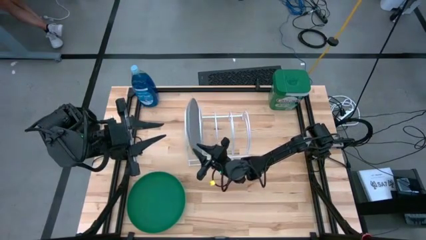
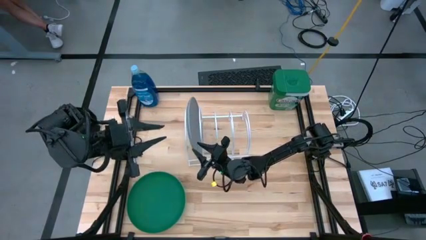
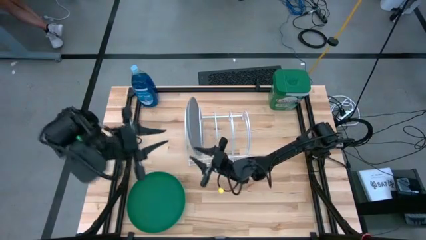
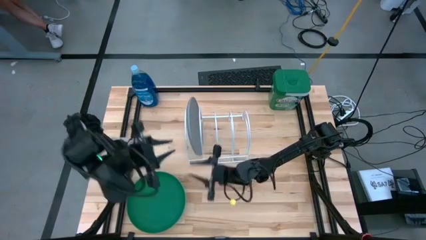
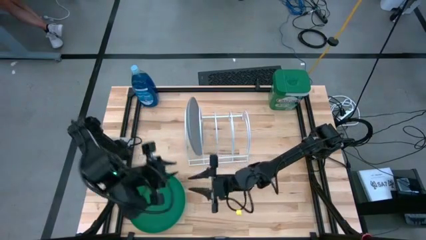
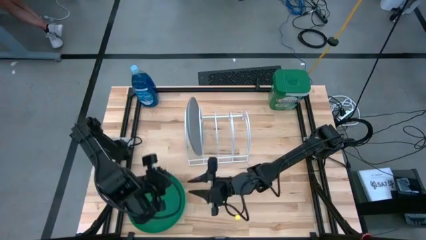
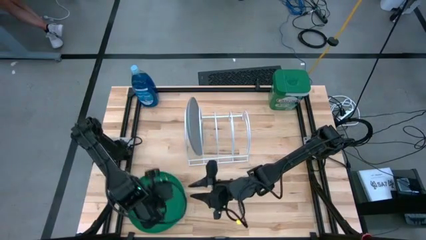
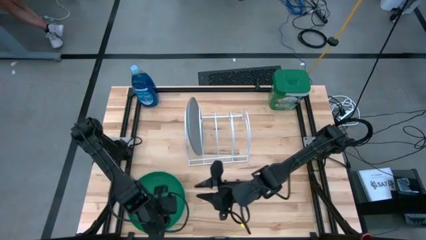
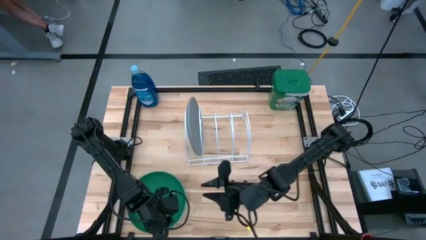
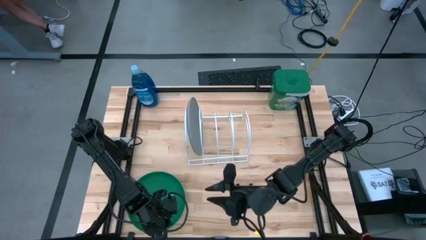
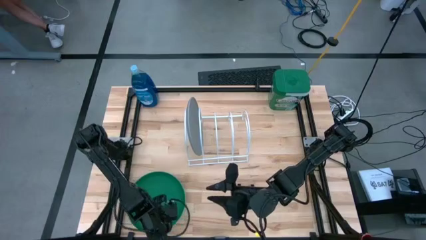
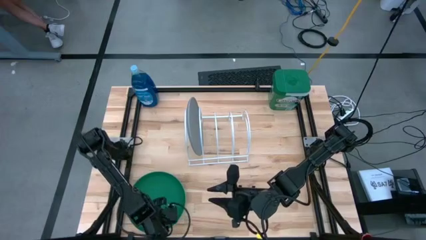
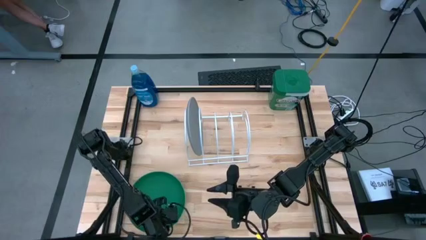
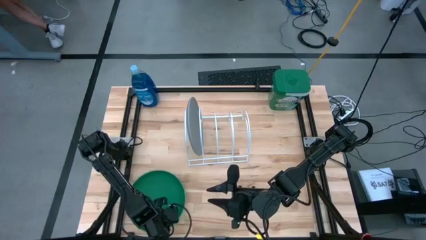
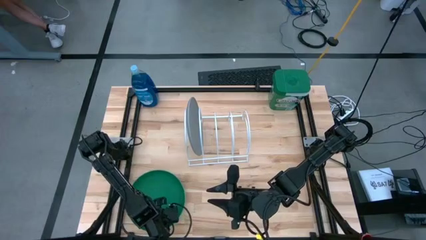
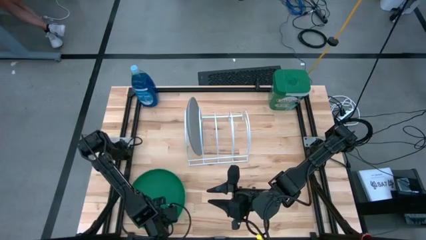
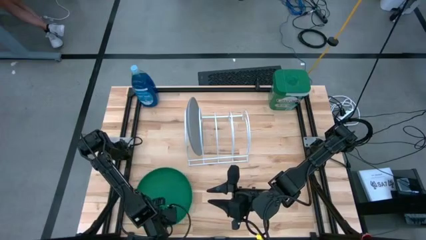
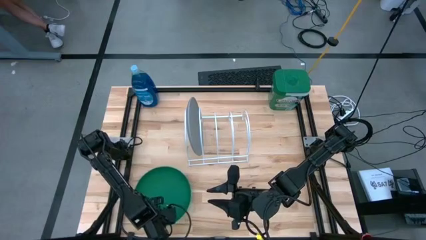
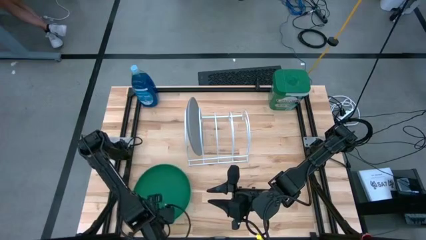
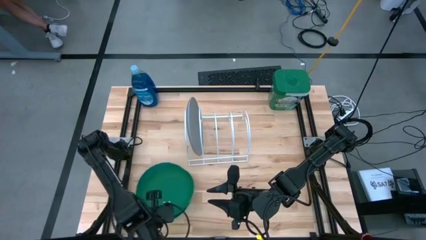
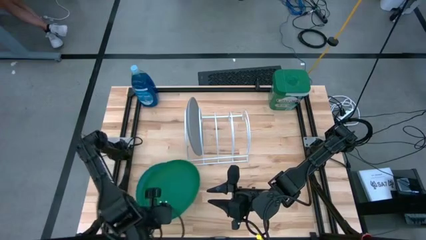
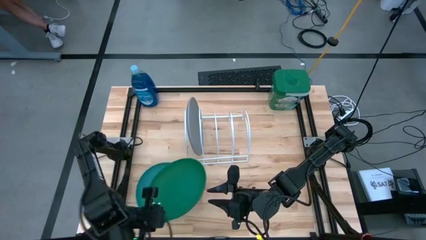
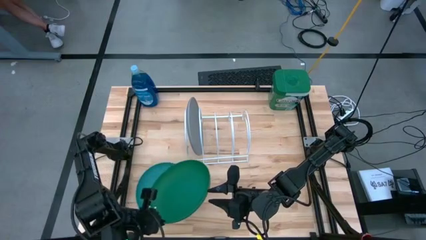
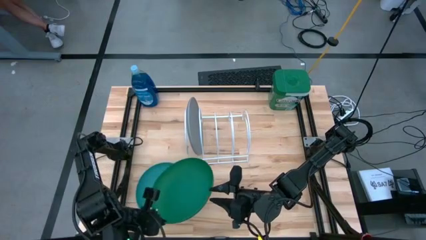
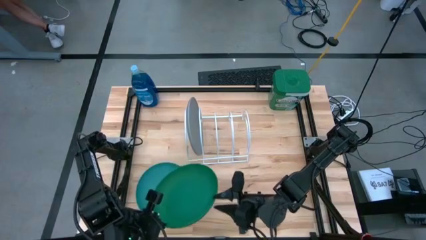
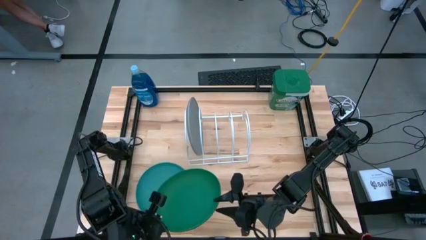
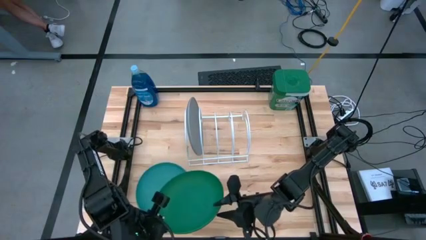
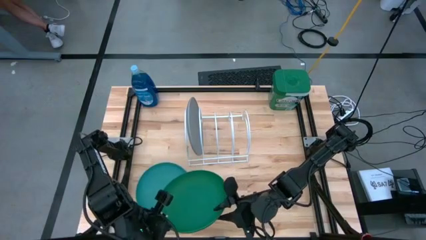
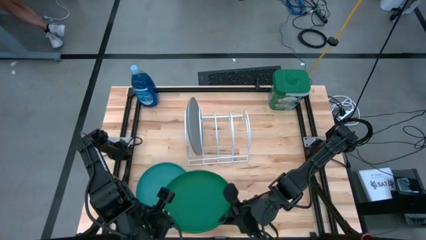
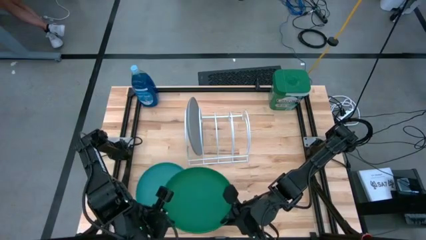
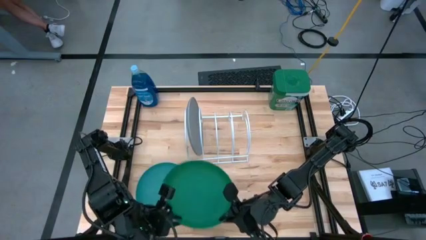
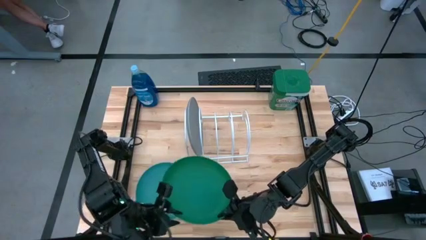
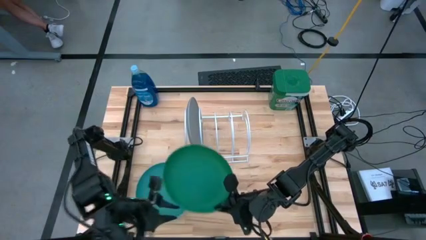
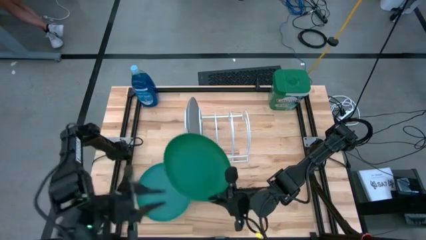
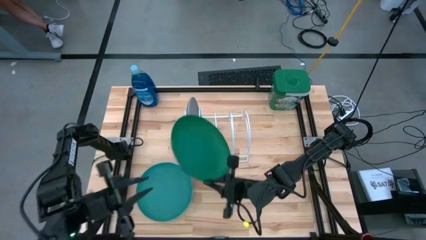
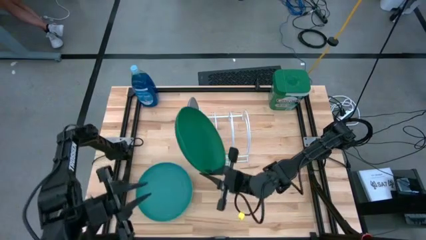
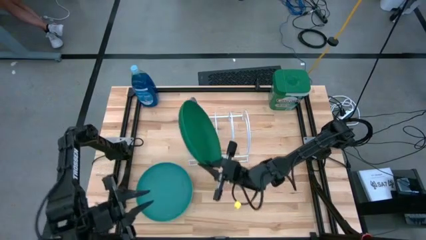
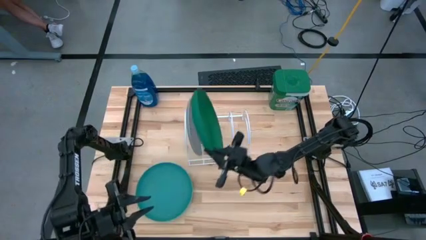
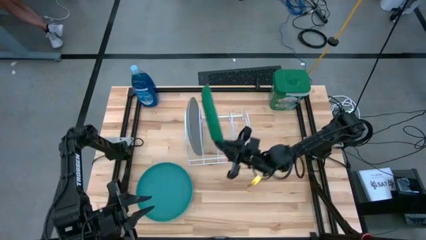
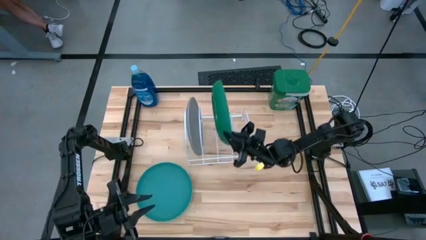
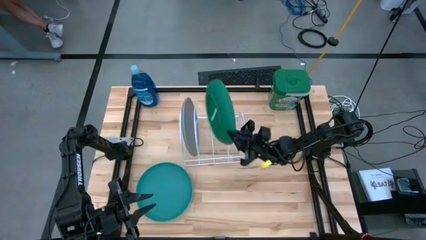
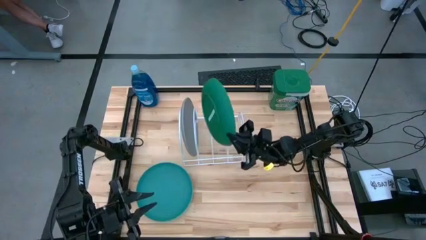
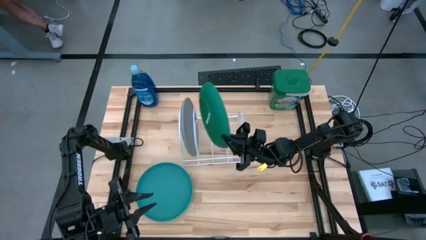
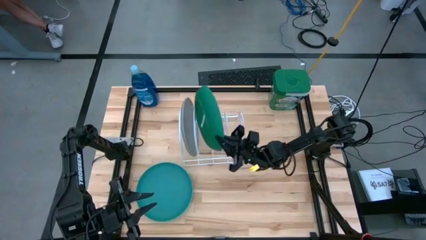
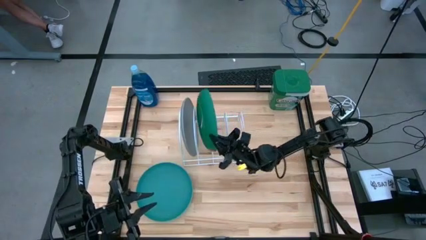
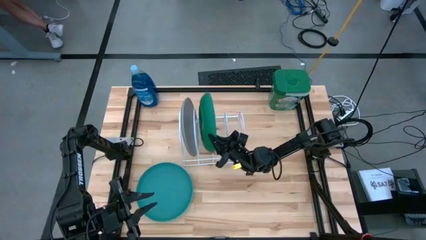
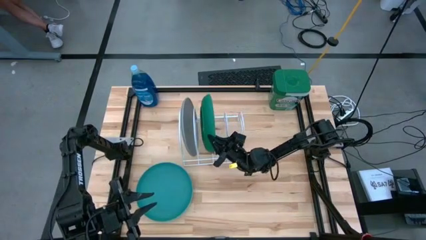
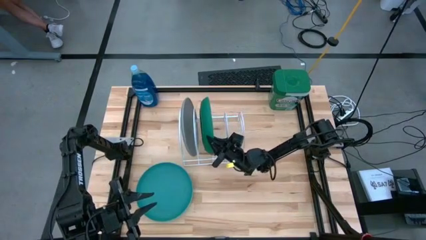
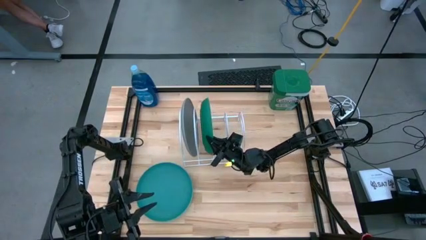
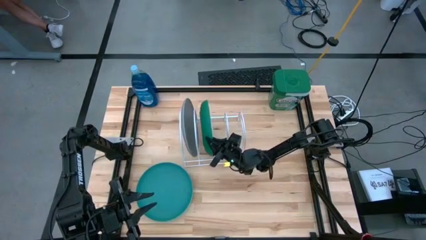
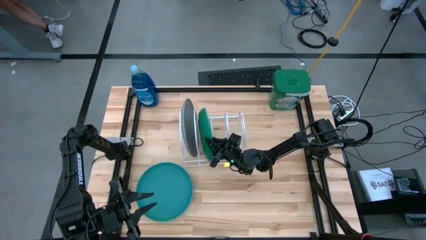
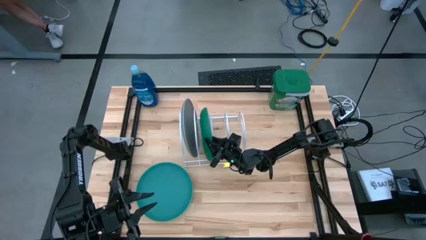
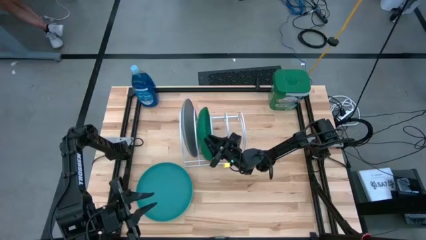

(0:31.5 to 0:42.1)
Task: Sort dishes
Put the green plate into the dish rack
